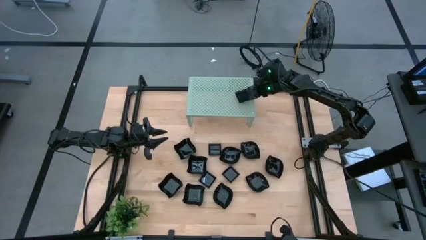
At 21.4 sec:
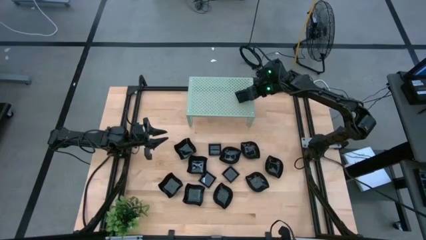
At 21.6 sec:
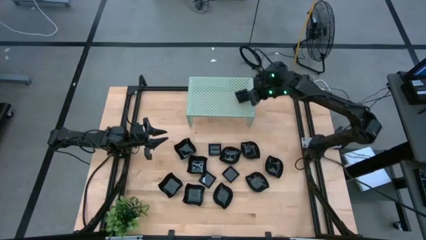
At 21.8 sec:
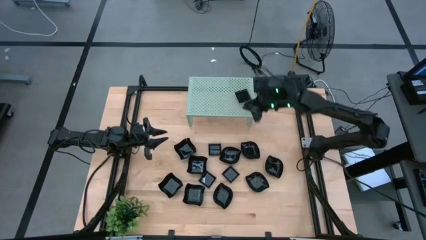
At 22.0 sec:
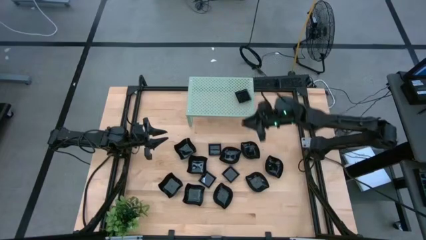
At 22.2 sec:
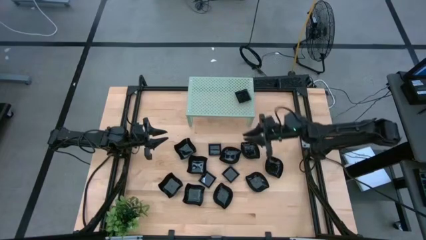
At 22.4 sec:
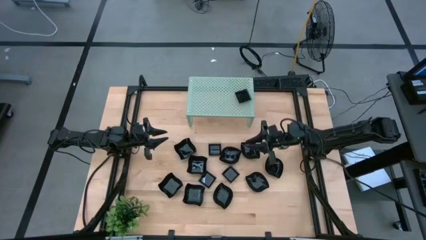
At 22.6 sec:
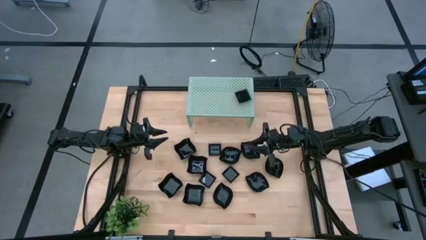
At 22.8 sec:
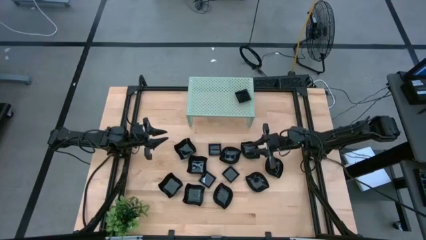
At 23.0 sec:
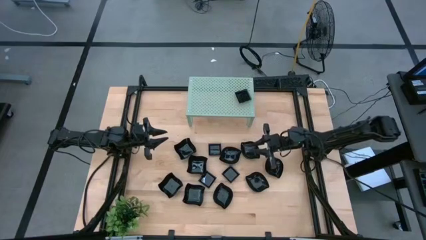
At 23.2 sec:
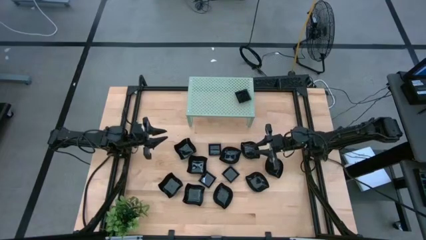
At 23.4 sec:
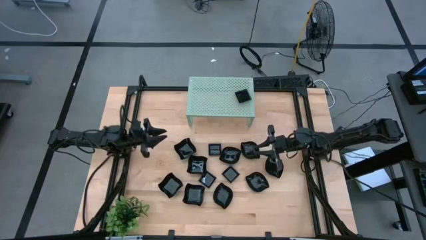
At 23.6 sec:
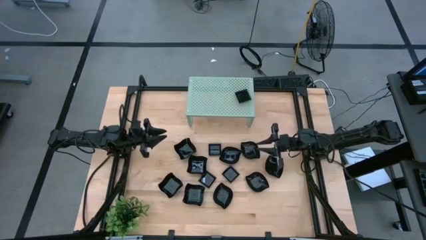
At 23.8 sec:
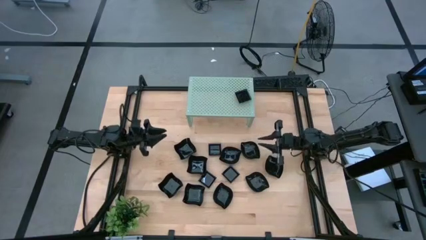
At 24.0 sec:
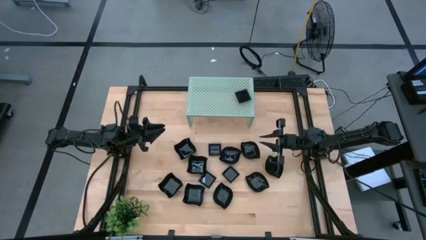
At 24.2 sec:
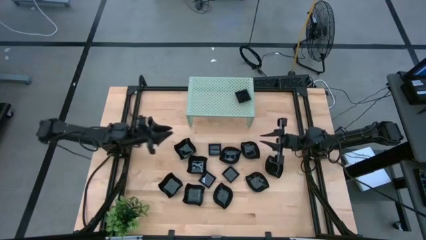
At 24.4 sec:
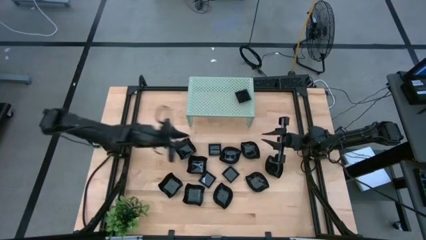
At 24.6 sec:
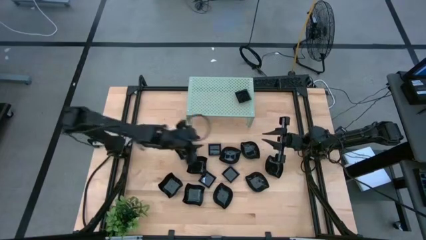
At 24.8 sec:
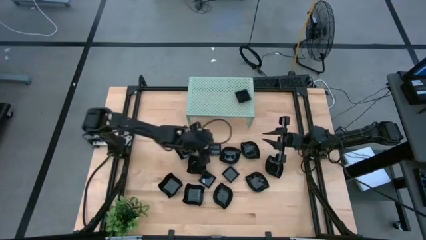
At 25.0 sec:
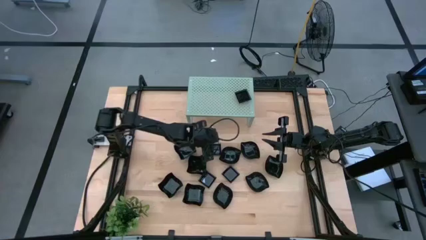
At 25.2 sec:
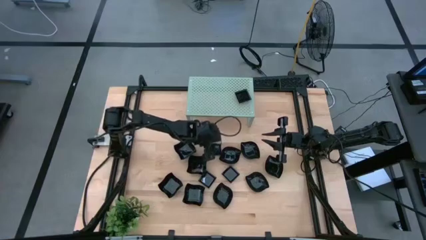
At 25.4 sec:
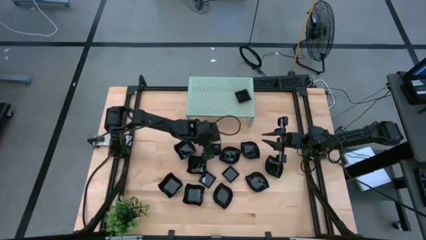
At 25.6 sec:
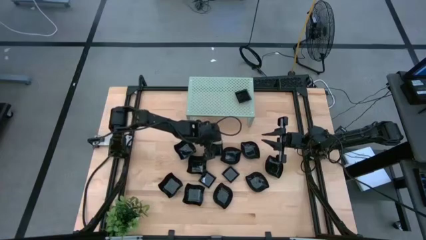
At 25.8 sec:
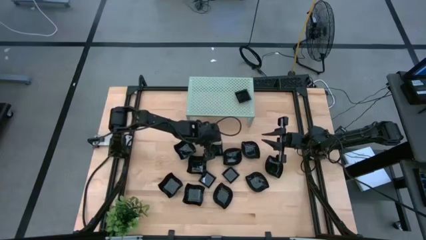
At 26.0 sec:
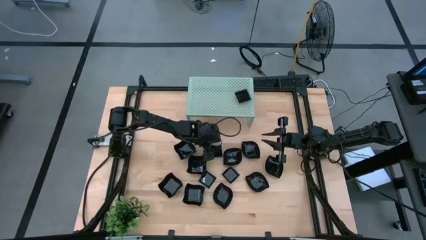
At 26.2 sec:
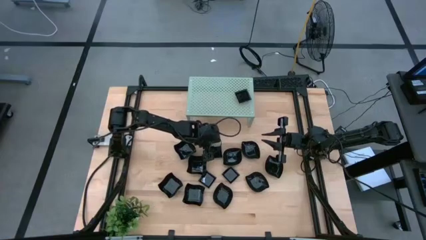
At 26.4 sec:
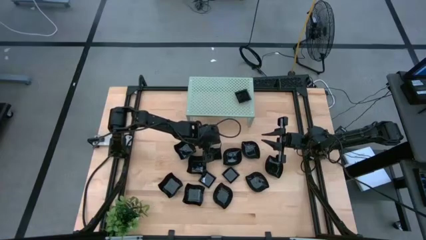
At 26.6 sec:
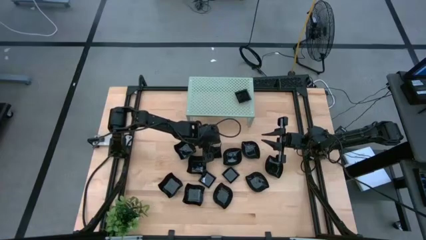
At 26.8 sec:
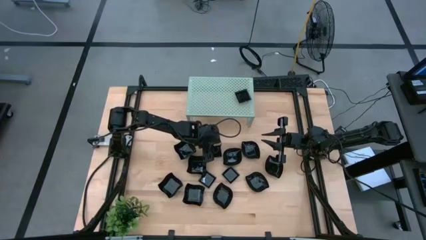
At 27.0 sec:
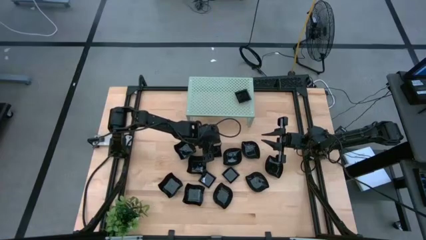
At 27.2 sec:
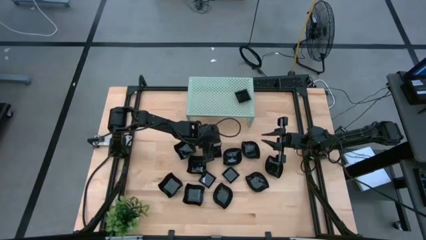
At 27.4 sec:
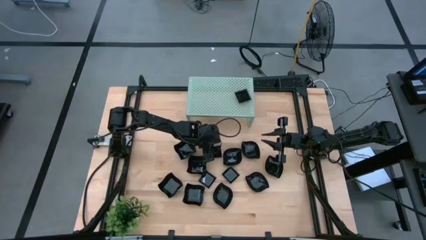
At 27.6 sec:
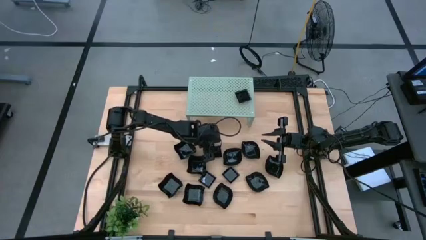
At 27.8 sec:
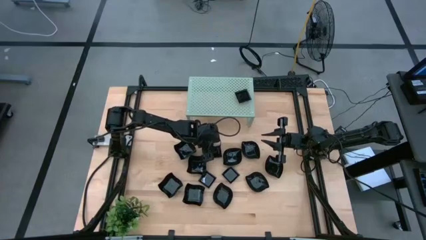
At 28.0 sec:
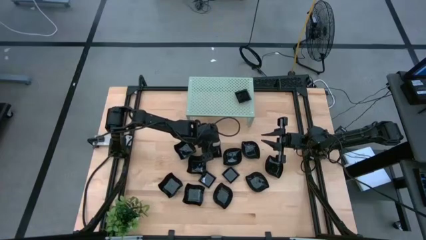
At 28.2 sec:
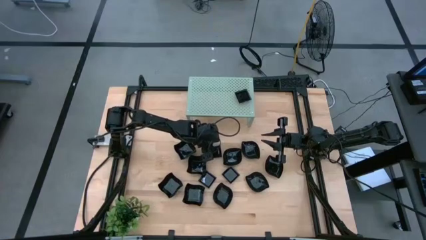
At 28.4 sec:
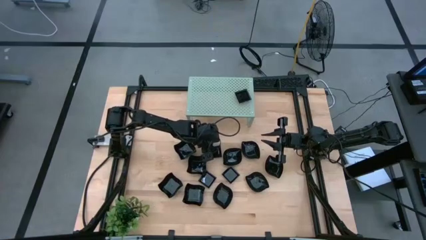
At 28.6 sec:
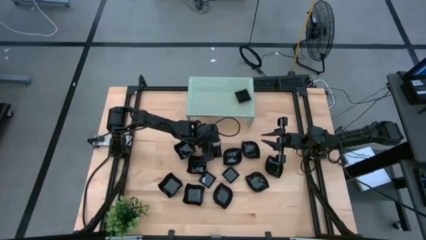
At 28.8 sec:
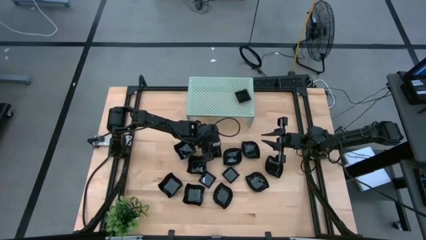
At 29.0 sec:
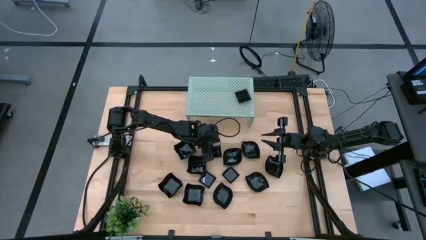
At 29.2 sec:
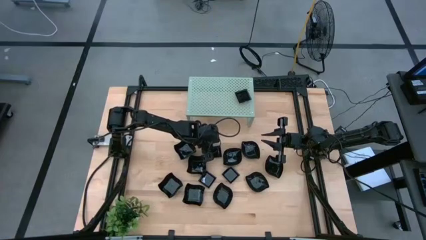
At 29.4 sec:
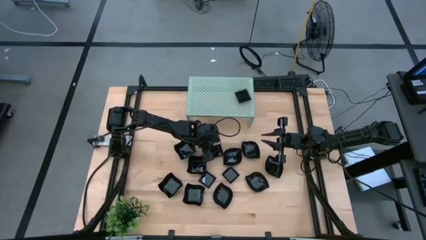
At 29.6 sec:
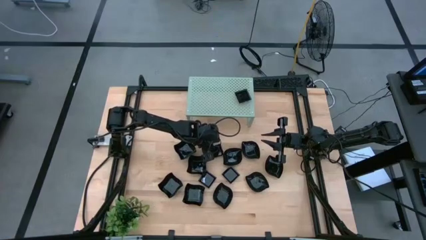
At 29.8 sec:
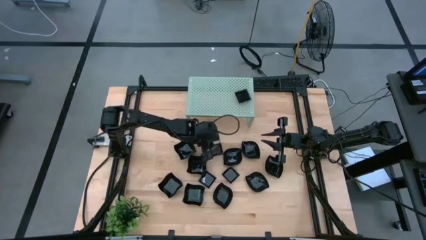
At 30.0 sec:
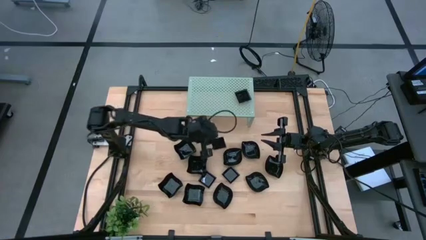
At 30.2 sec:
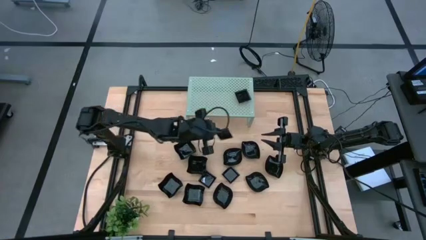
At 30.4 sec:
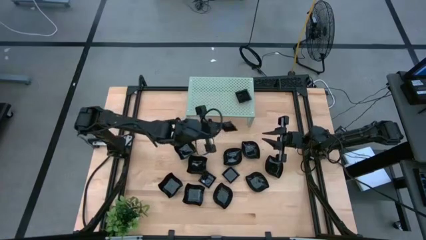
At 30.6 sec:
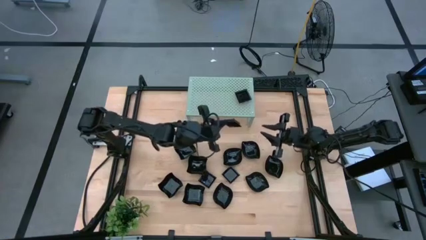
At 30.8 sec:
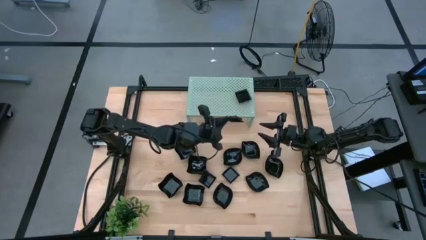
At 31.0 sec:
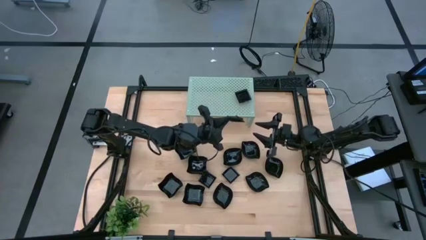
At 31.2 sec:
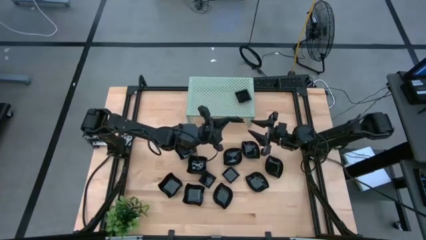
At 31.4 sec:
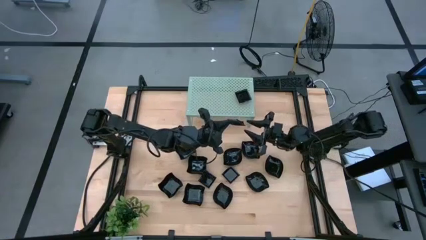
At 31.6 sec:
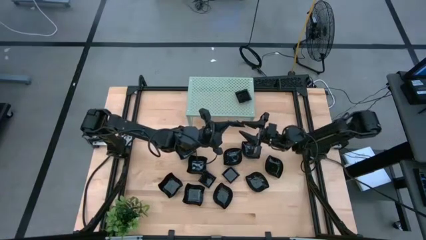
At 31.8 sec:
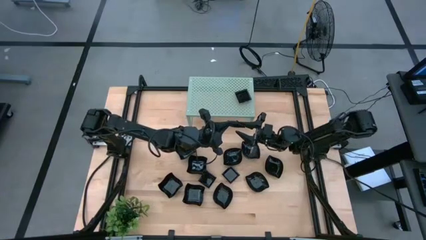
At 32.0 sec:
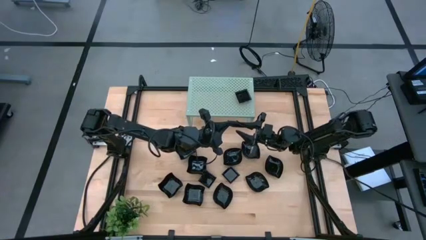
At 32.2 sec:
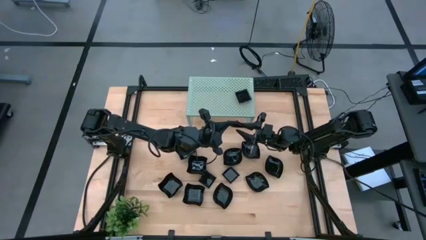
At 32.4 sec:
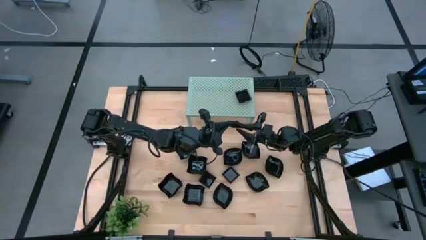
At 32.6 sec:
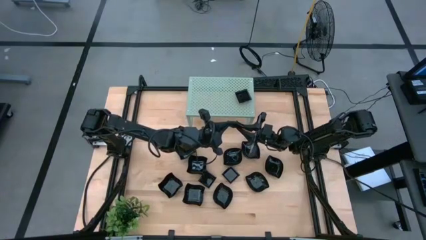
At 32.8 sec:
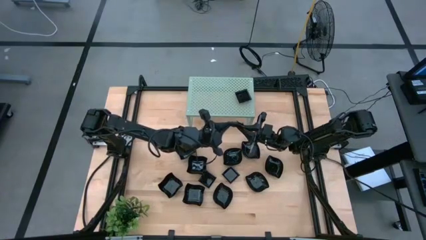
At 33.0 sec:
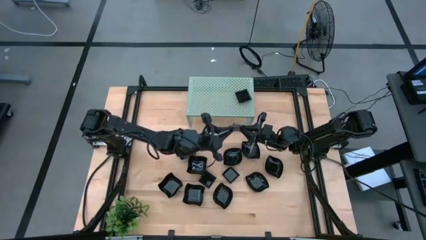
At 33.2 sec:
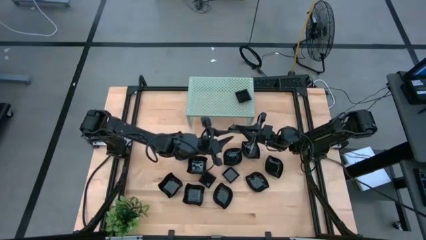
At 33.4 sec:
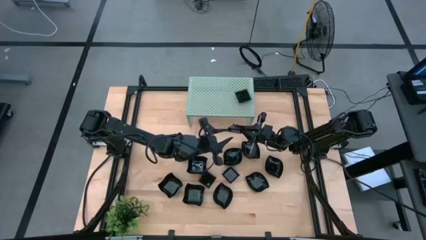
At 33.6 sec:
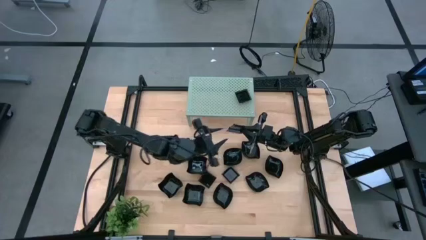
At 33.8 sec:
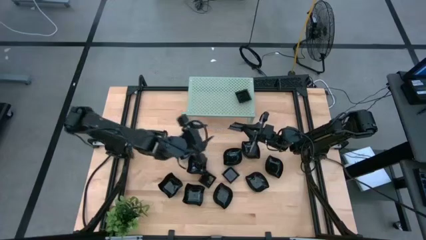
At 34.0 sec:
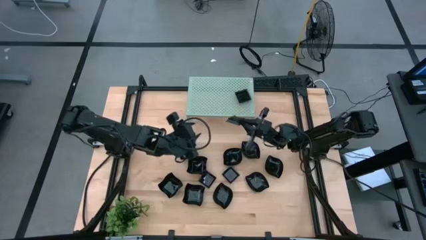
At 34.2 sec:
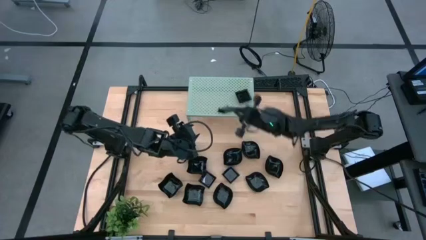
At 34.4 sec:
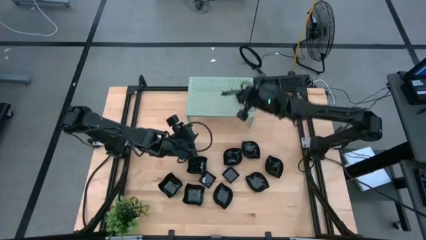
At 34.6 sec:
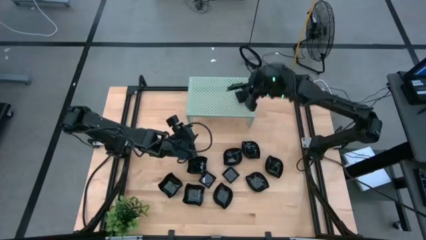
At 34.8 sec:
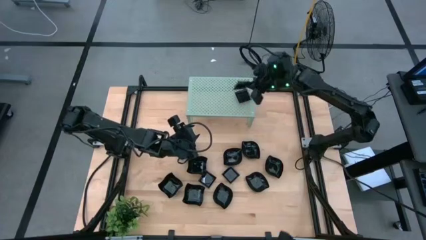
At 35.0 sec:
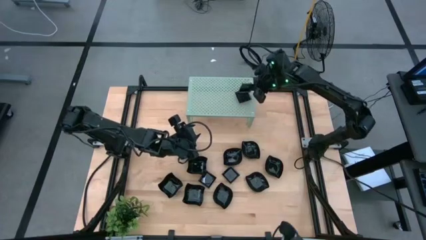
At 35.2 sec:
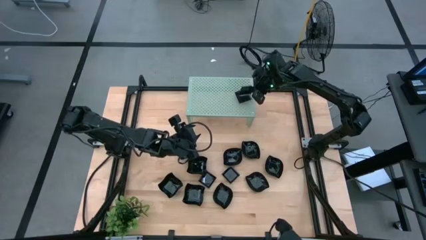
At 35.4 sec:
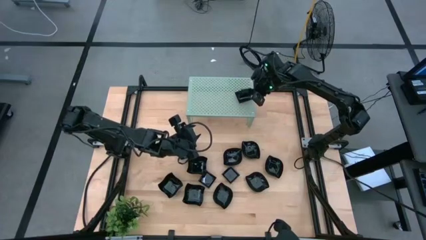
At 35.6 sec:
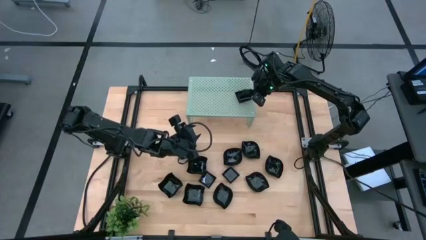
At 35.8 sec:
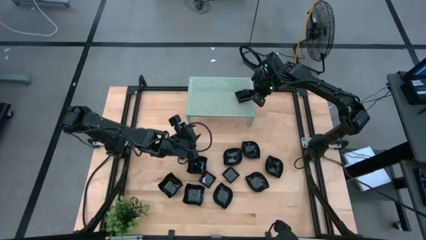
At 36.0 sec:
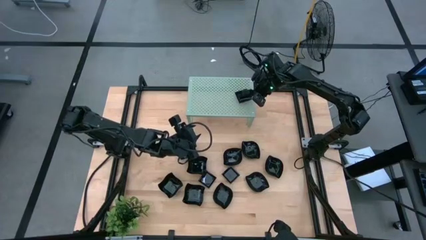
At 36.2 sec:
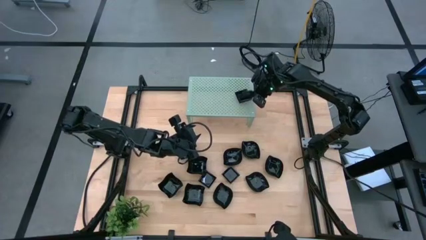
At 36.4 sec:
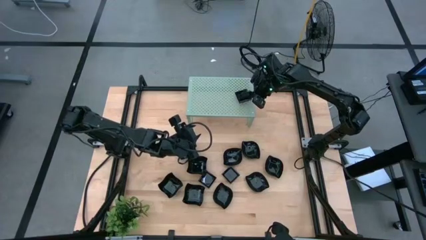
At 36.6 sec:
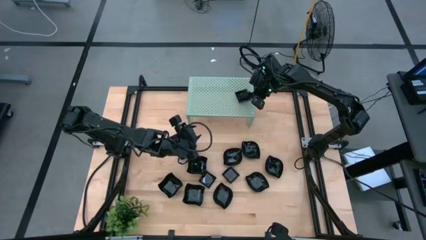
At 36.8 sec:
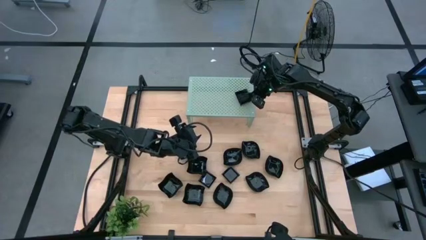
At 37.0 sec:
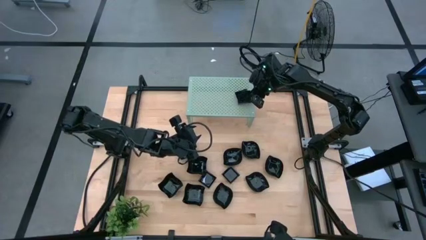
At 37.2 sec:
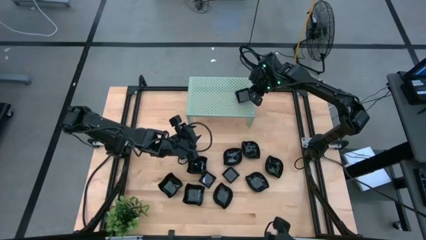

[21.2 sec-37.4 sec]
Task: Pick & Place Mini shaped plates
Stack the black square plate on top of the other black square plates on the shelf
